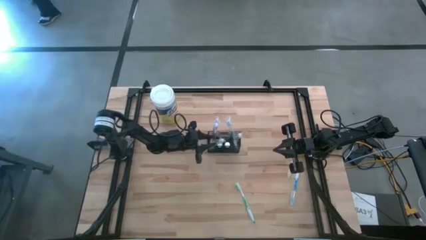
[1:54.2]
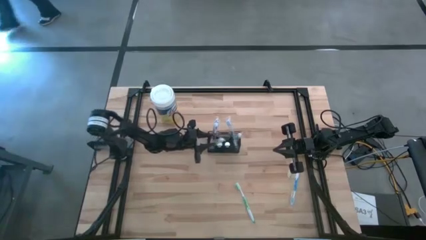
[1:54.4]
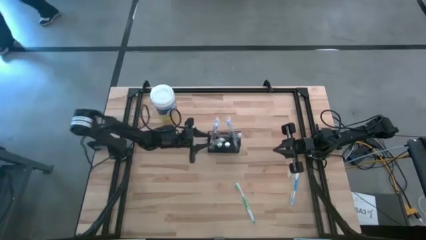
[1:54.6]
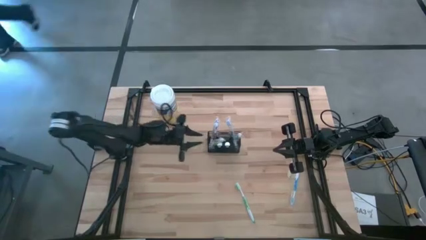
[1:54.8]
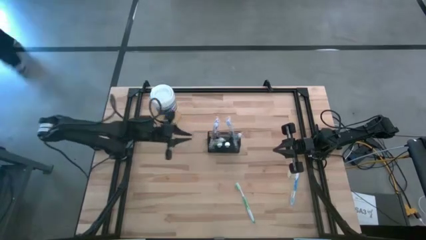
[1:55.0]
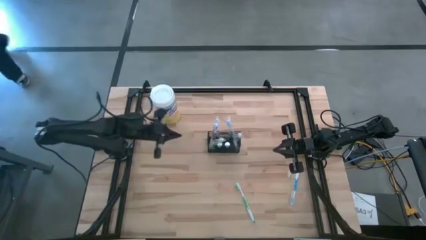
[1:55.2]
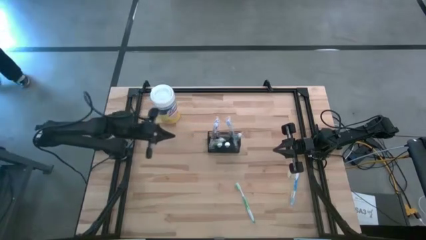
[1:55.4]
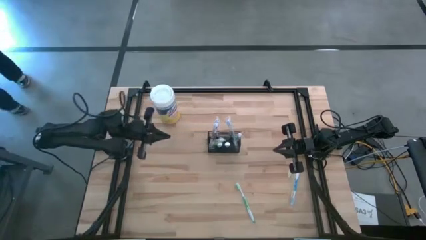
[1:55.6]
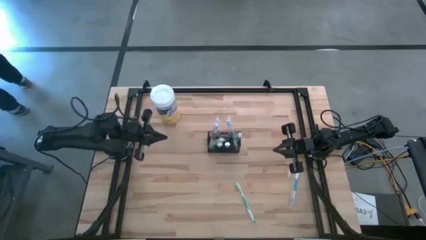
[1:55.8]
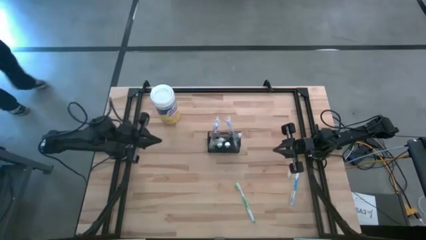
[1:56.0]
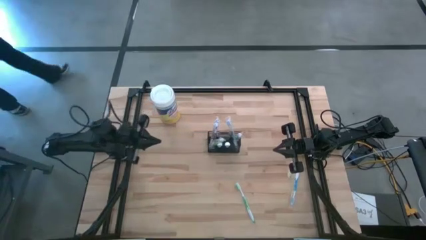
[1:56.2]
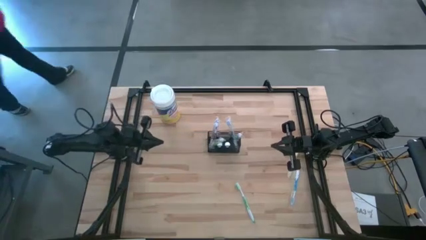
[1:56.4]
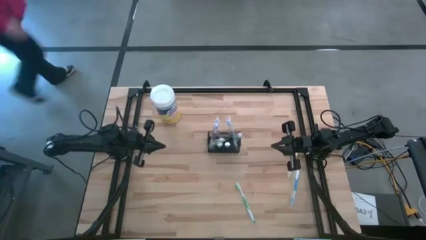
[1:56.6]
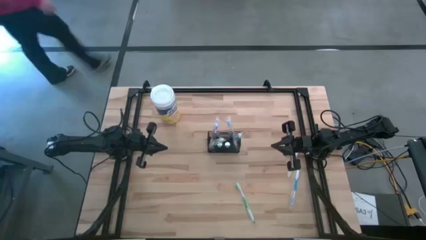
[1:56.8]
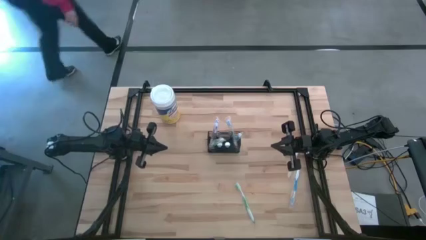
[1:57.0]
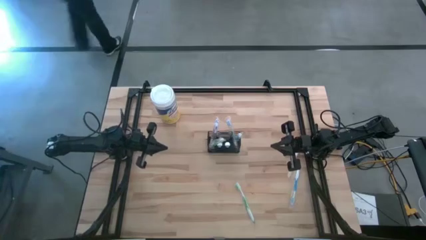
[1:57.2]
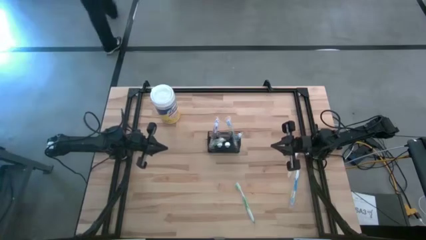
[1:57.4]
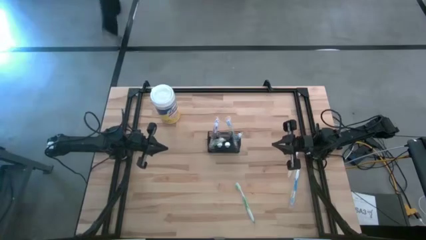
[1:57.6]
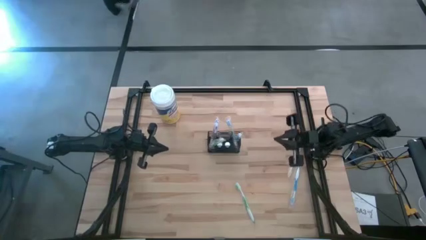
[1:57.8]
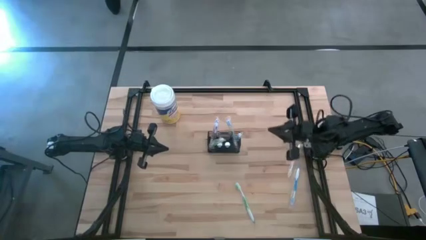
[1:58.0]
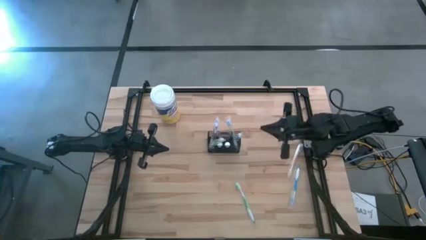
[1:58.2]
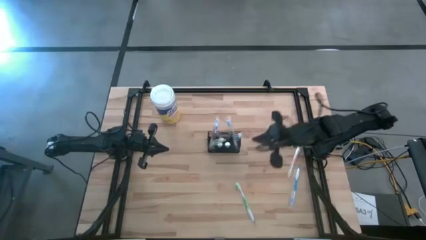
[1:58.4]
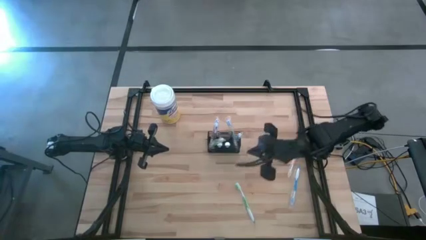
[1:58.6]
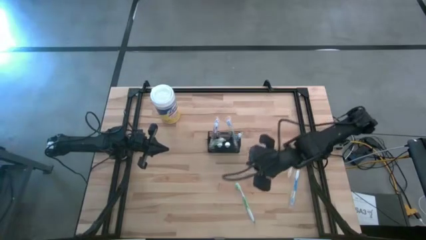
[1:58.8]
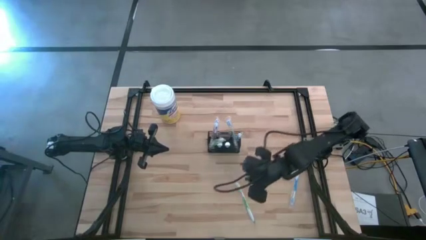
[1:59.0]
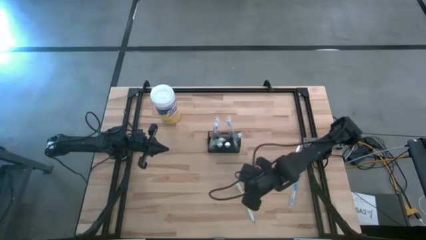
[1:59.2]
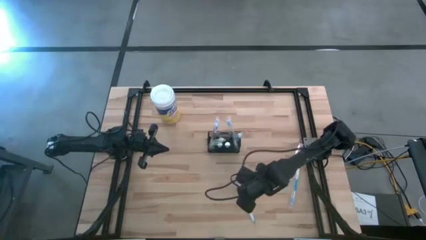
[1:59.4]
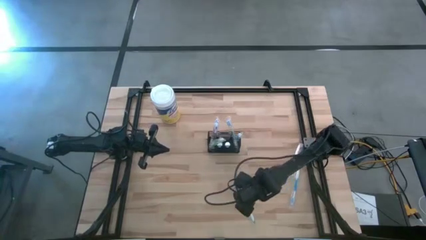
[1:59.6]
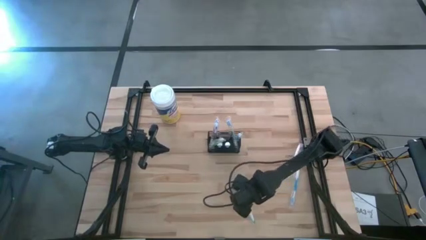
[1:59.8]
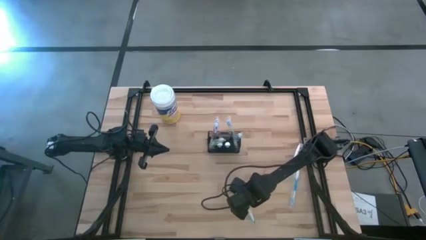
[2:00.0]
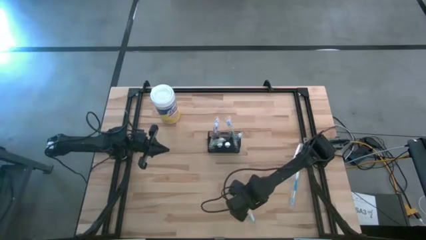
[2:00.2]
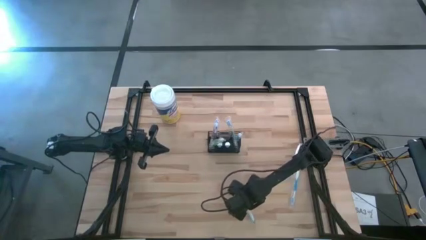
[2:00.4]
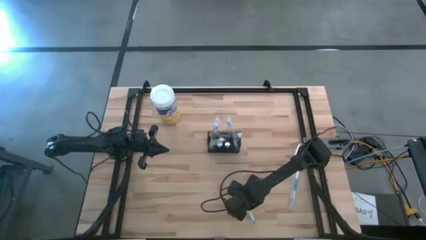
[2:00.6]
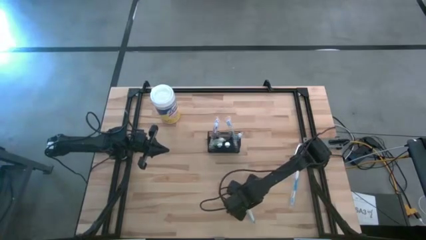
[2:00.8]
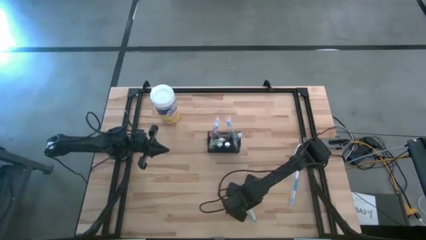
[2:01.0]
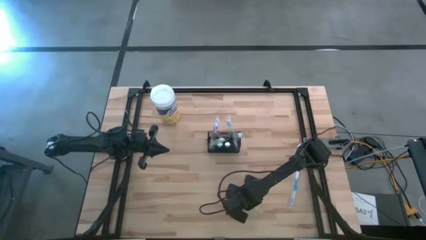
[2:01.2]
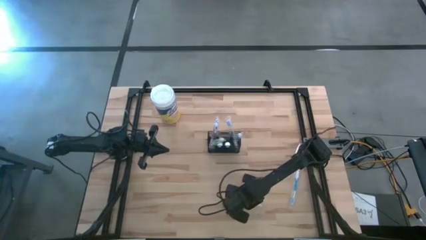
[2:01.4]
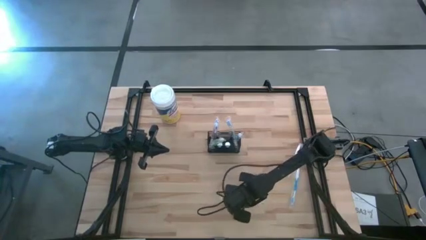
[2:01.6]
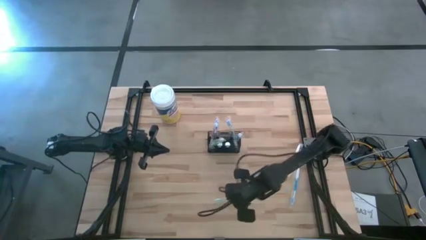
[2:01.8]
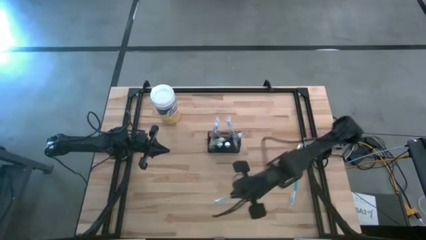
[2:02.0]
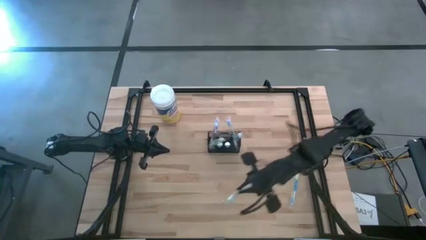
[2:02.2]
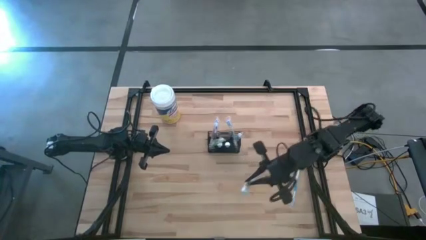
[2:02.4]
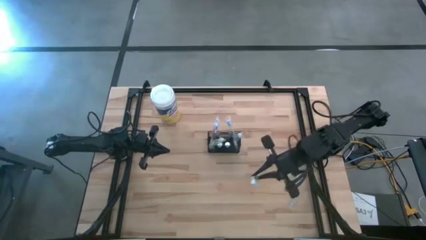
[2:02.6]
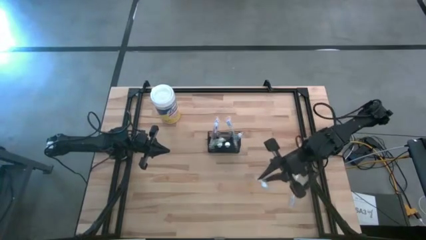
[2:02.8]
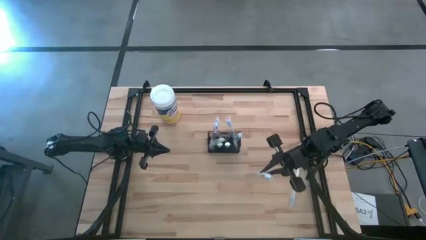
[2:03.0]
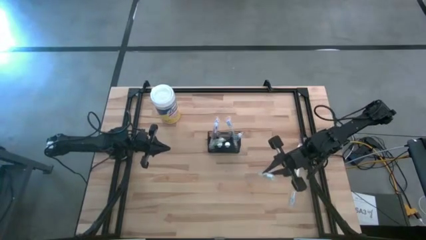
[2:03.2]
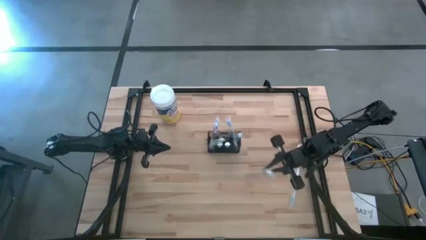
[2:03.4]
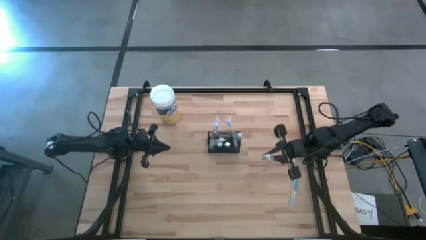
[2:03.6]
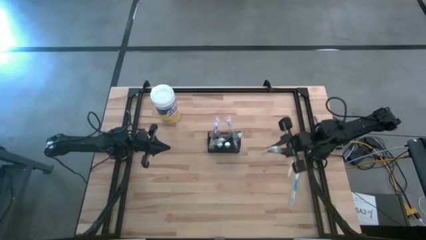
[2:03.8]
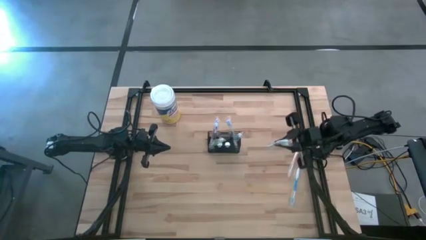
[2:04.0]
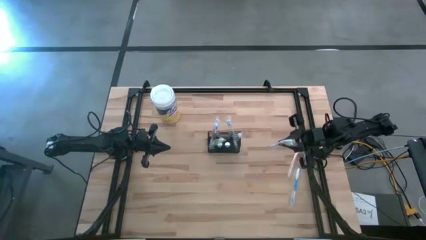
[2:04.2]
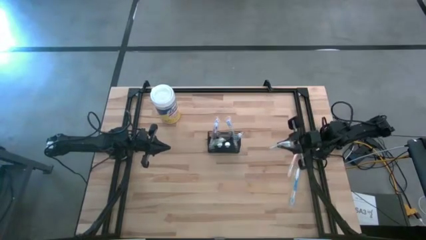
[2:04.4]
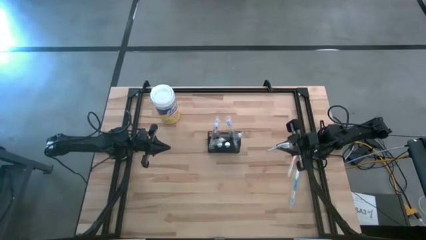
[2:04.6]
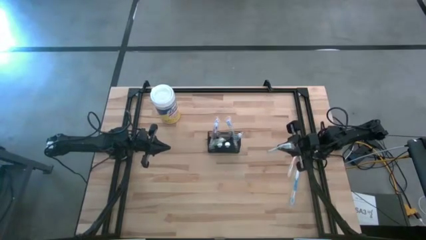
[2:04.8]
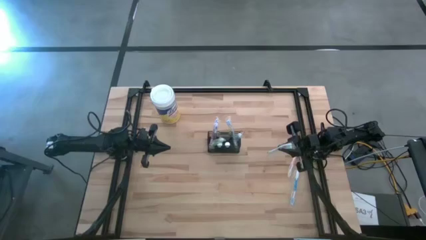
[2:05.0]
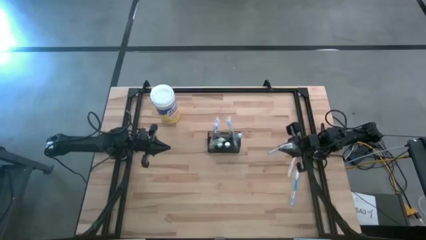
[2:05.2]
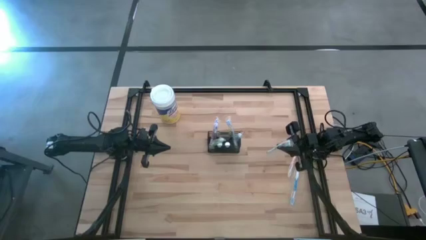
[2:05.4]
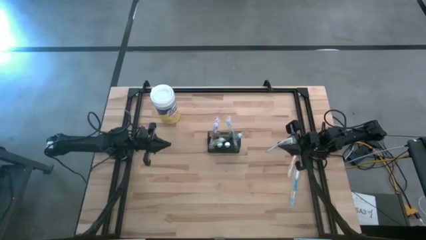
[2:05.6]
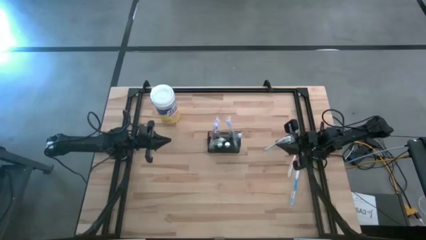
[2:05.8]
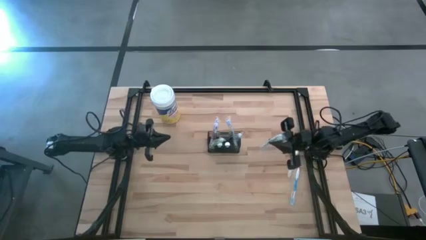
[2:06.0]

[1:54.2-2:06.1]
Task: Pick & Place toothbrushing station
Put the green toothbrush into the wire organizer

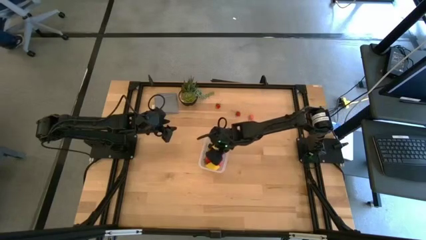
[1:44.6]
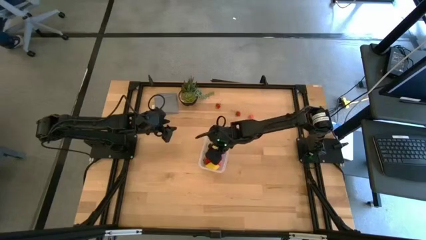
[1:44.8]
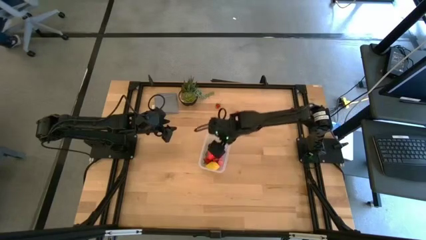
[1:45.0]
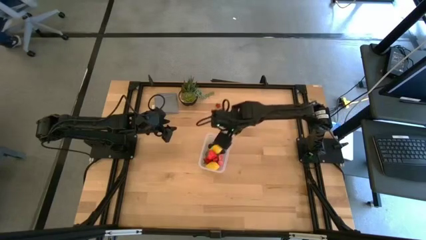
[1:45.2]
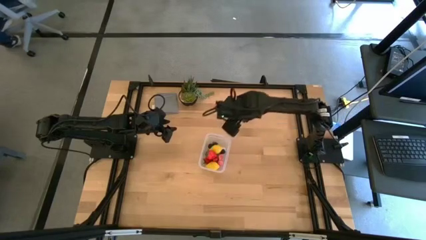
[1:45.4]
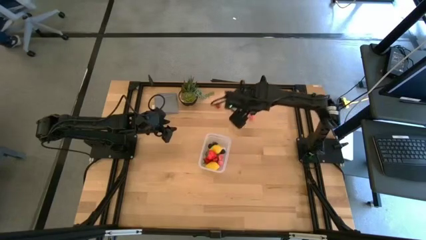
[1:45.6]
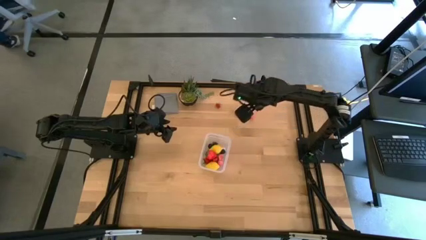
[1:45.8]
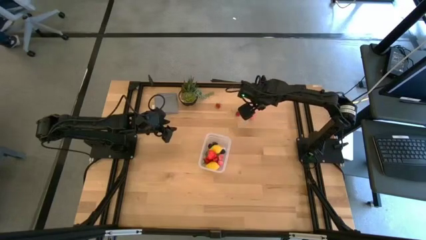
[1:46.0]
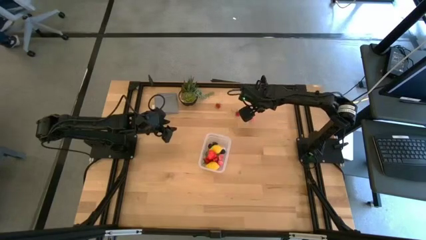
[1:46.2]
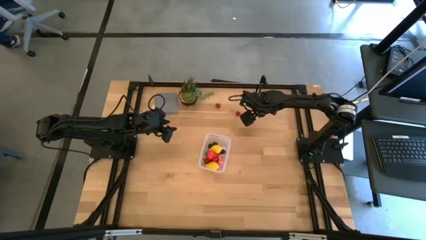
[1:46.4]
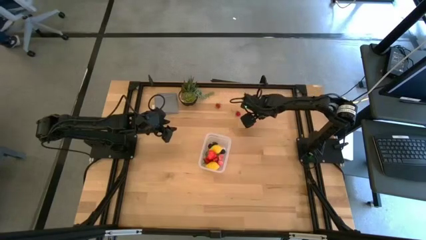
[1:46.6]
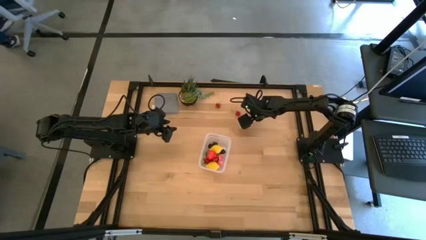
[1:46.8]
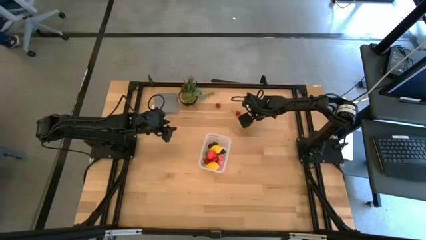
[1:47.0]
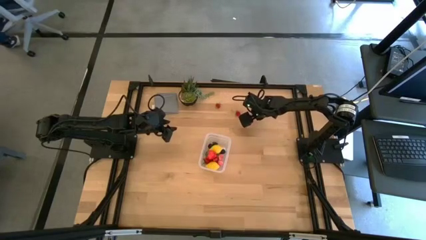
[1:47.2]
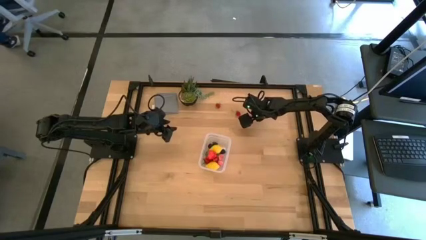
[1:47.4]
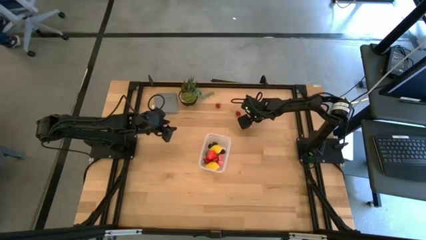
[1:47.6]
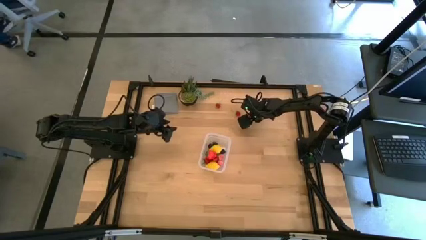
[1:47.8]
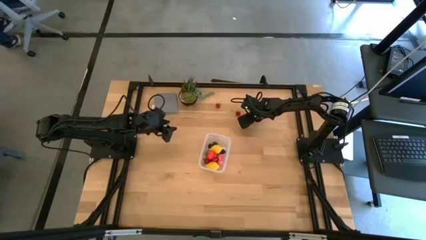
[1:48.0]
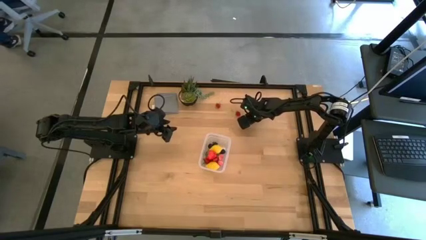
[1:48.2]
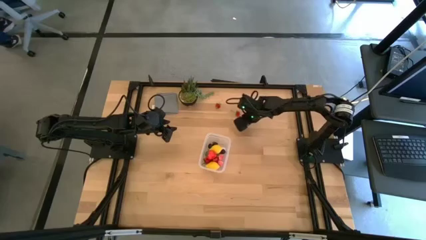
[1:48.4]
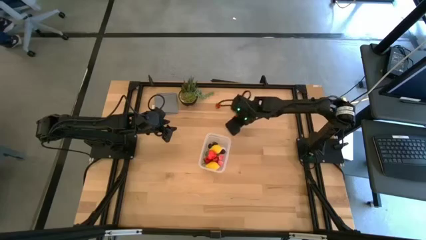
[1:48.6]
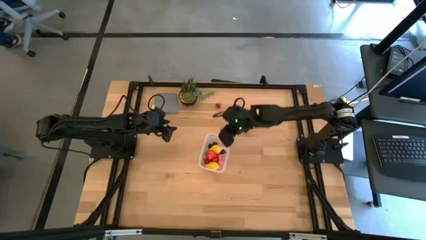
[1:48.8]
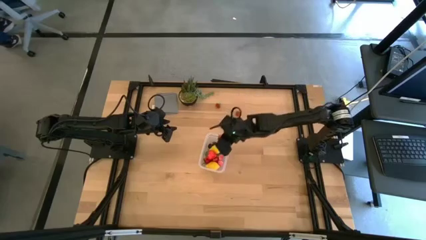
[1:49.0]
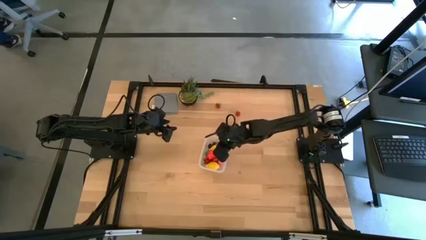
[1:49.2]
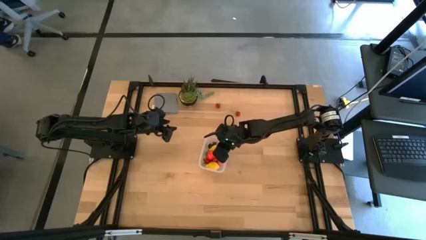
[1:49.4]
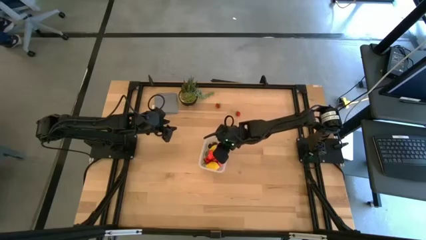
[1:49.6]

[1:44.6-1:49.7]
Task: Pick and placing Produce into tupperware
Put the pink peach into the transparent bin
